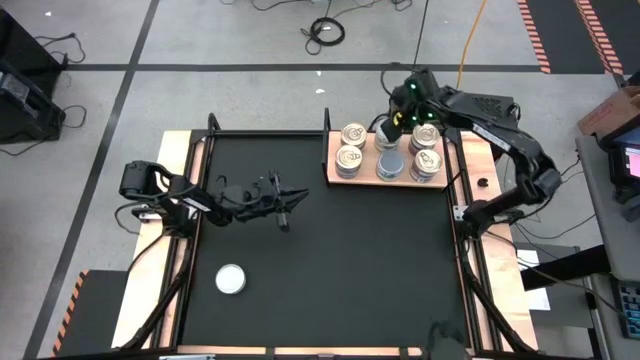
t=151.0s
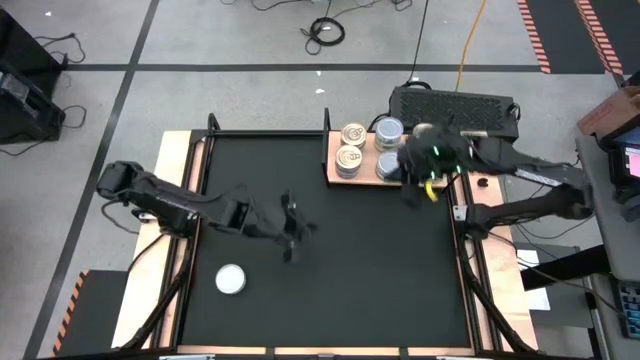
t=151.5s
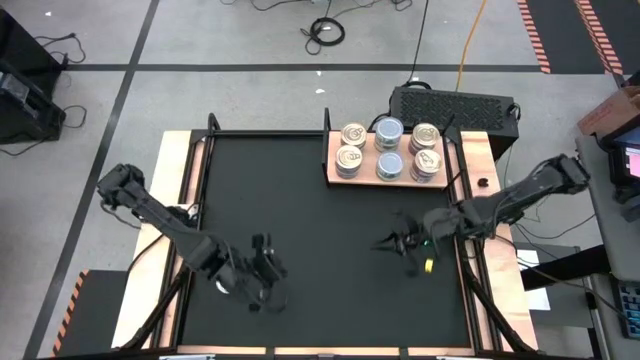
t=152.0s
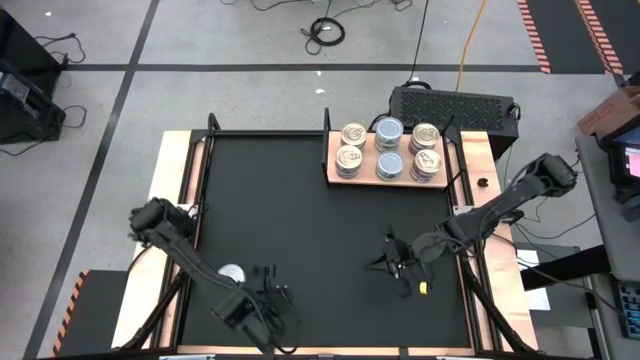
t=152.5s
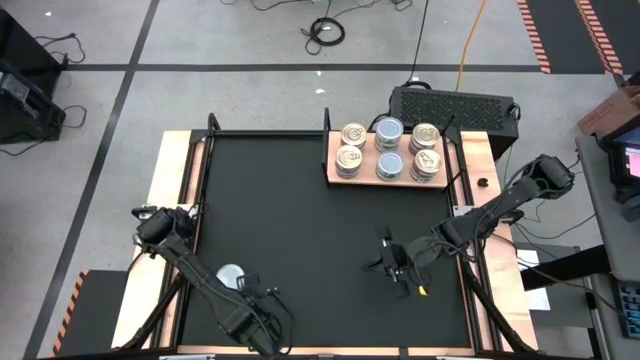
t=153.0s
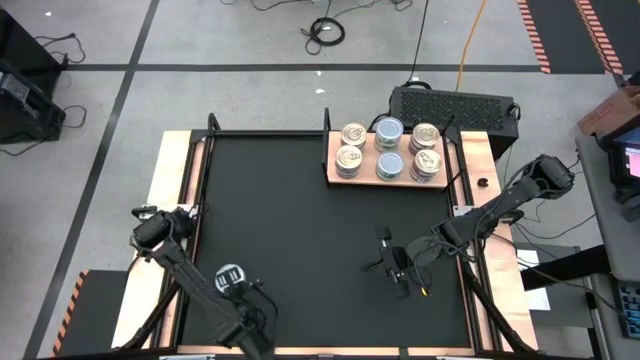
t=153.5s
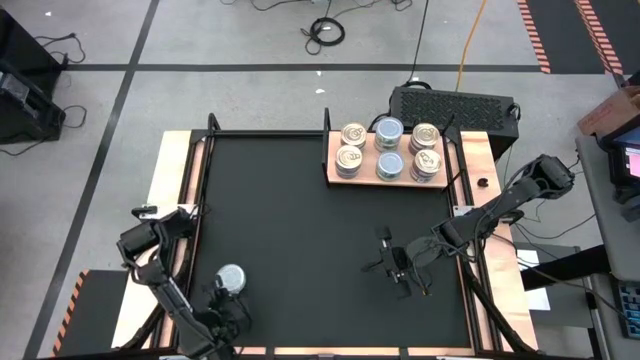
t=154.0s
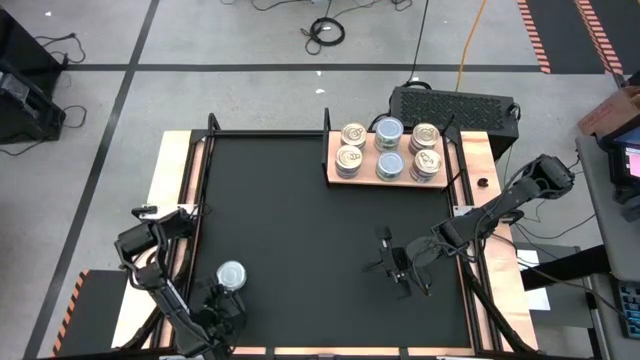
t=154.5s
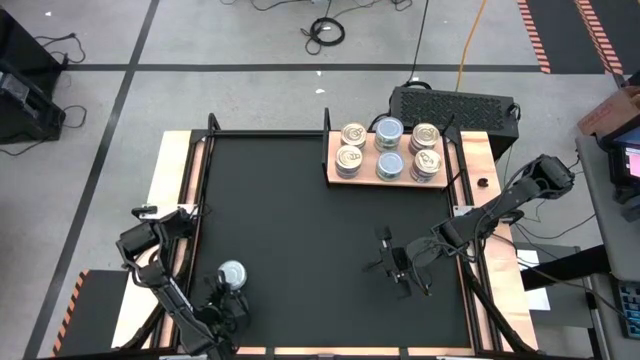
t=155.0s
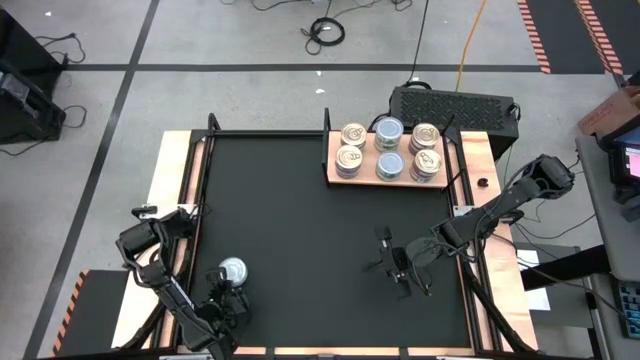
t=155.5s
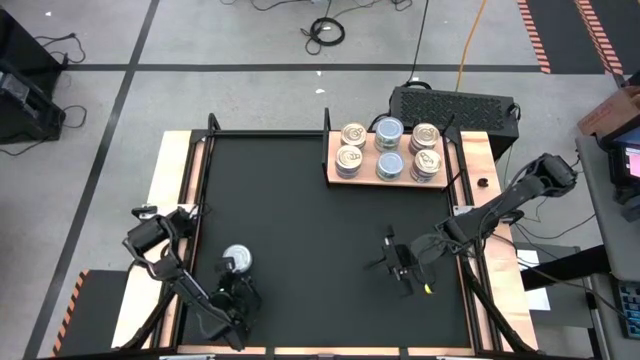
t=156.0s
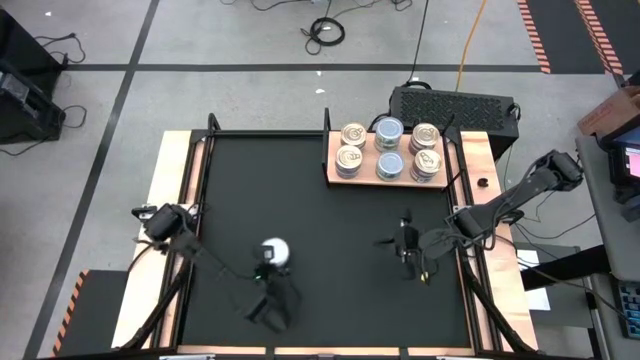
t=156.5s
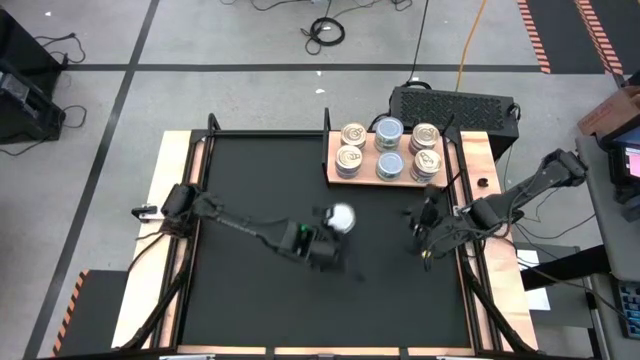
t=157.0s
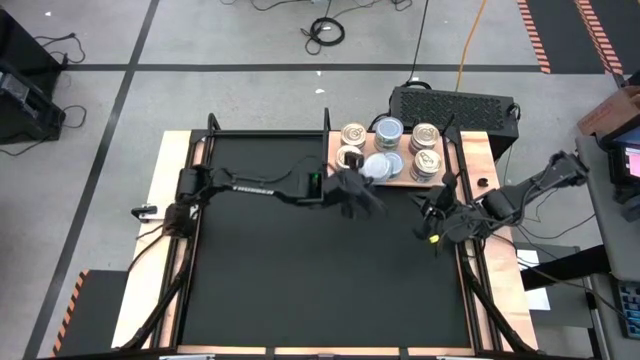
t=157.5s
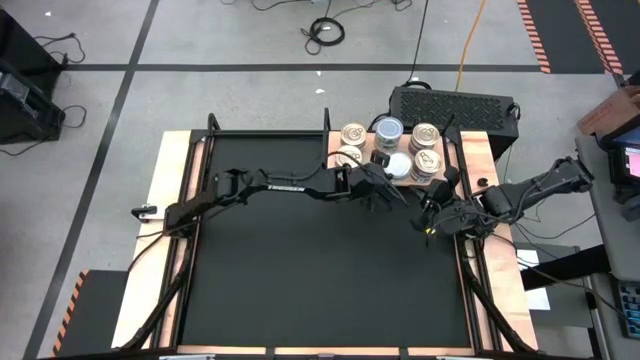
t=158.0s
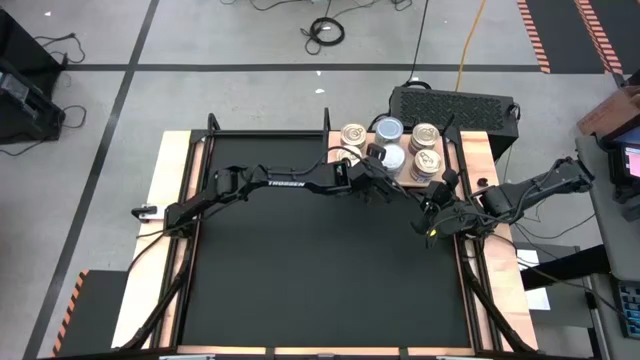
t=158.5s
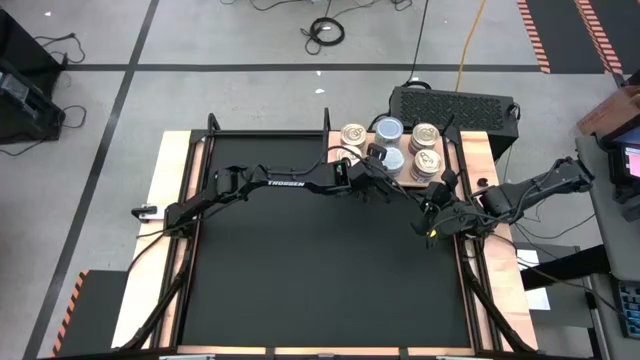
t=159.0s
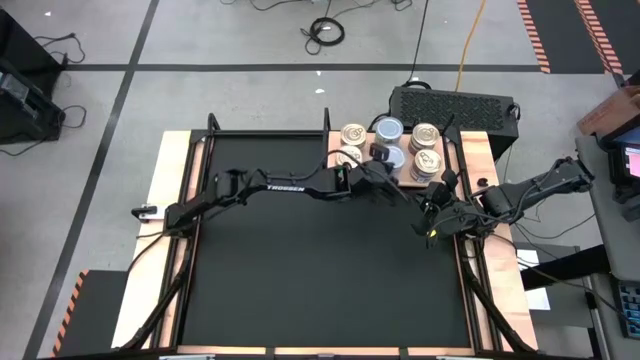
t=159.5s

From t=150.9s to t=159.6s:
Task: Stack canned seafood by type on shelf
Stack the green tuna can on top of the bottom green tuna cans on the shelf

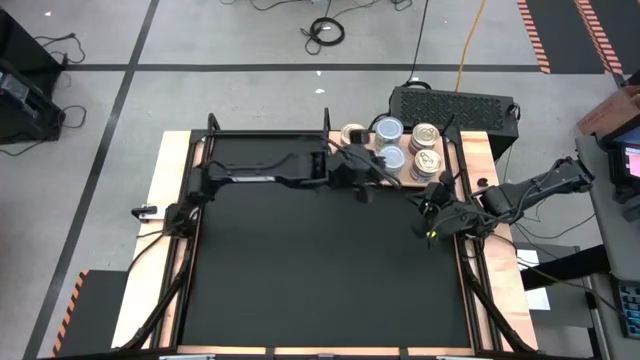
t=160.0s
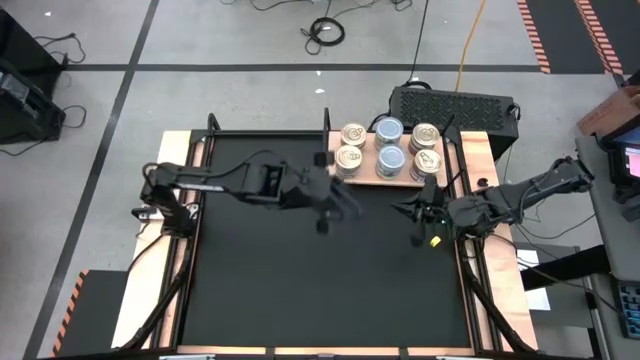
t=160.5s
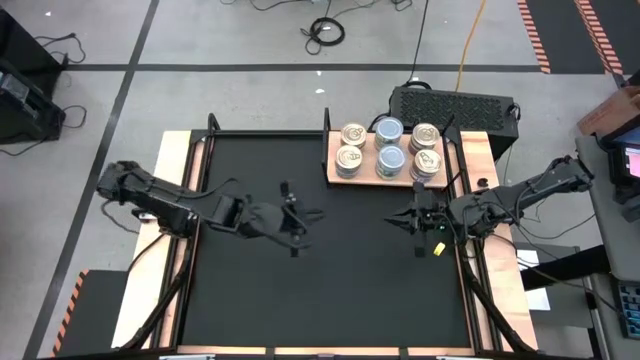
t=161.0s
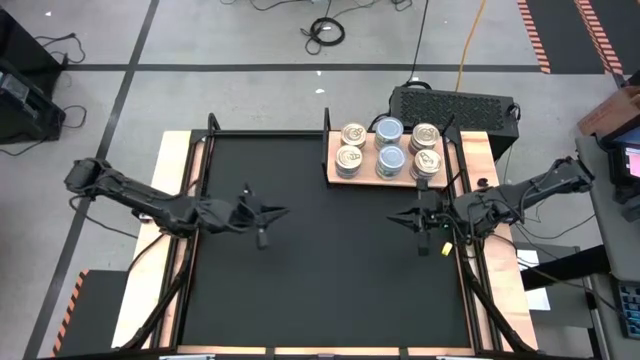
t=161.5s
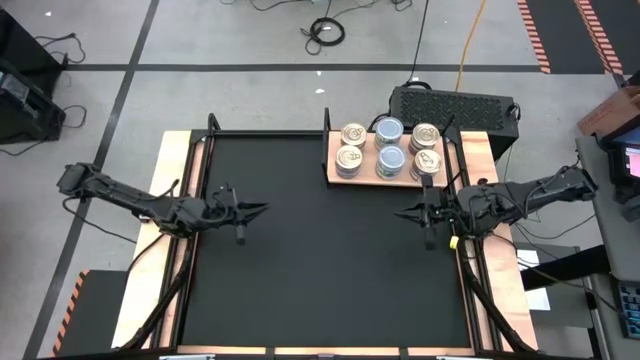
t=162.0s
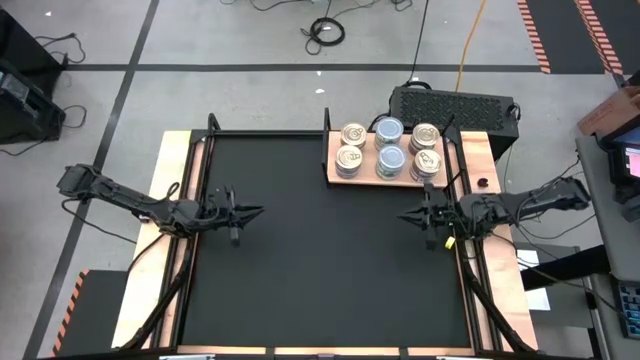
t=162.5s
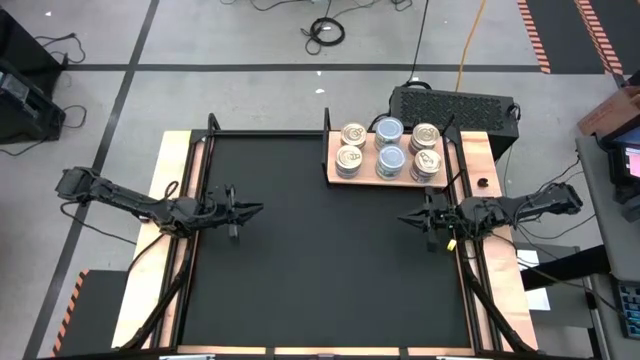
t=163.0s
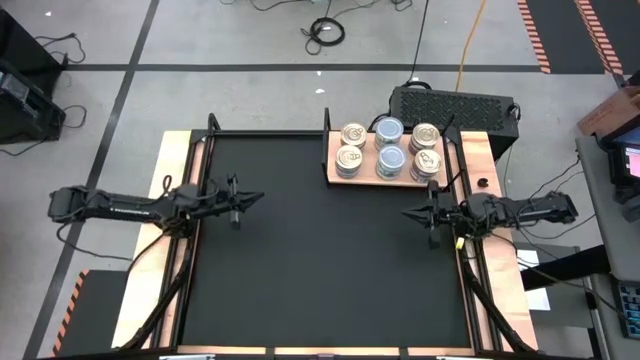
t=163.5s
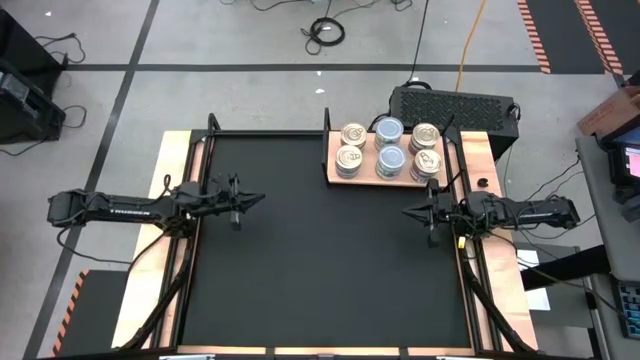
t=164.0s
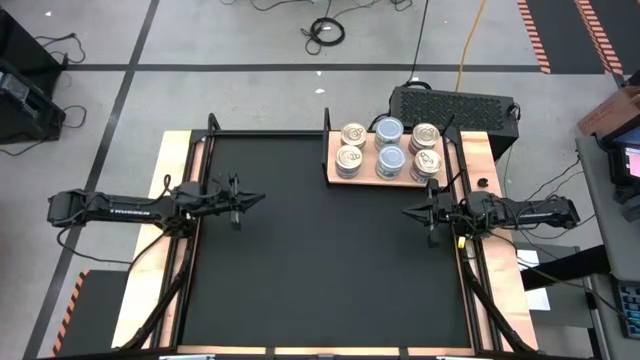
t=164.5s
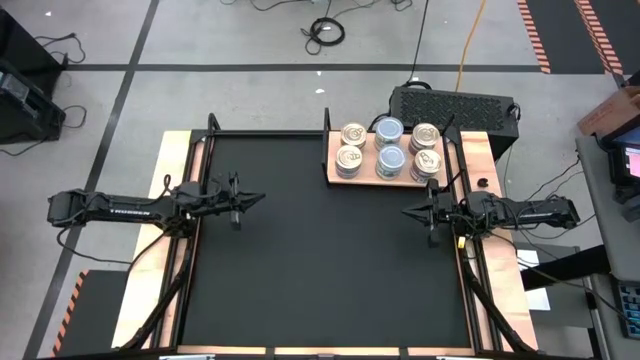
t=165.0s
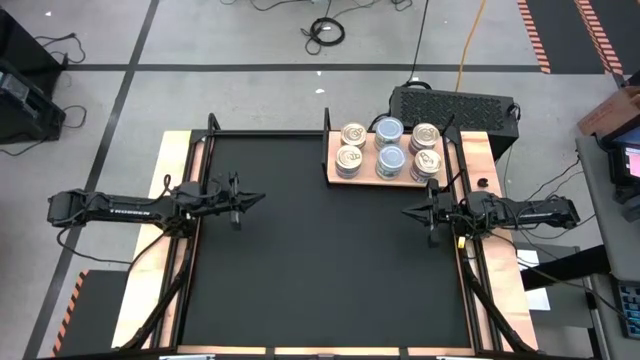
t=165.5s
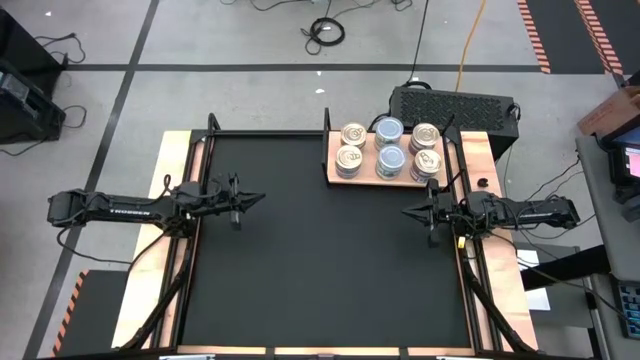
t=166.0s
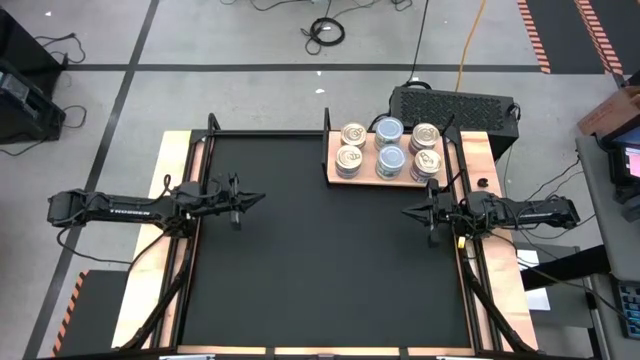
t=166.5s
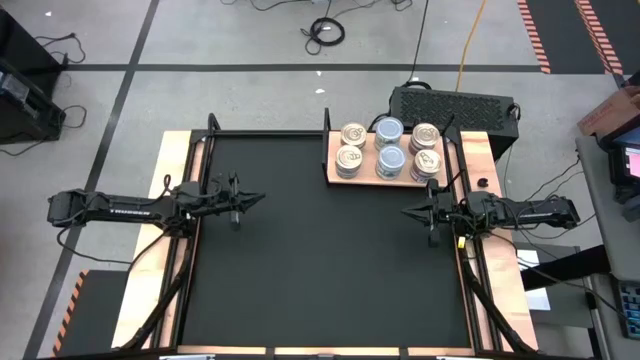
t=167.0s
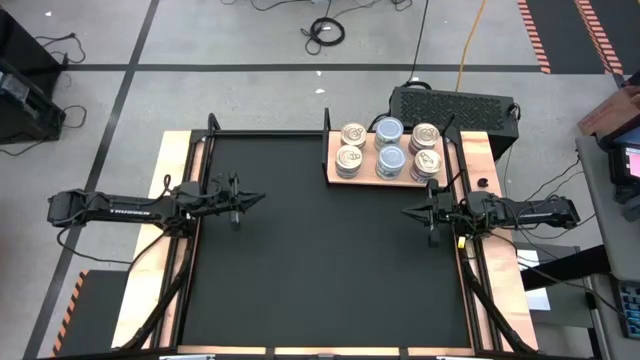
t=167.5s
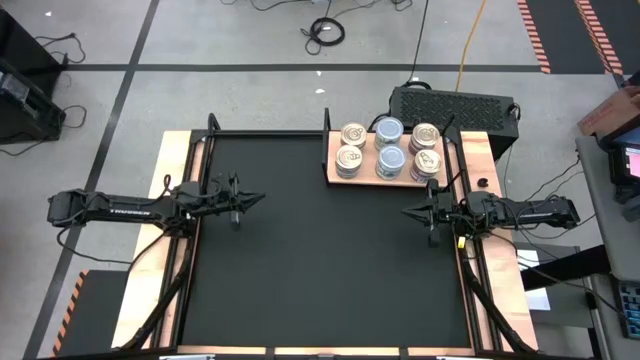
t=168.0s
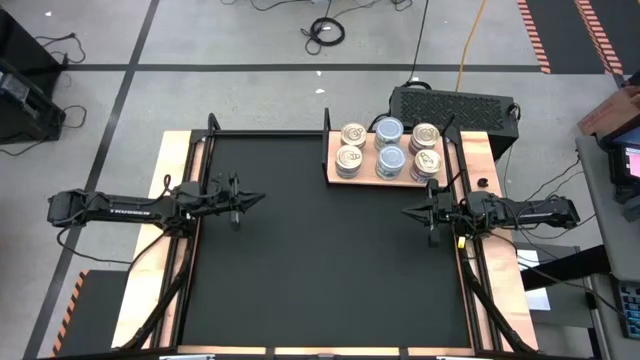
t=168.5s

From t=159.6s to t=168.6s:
Return to Home Position

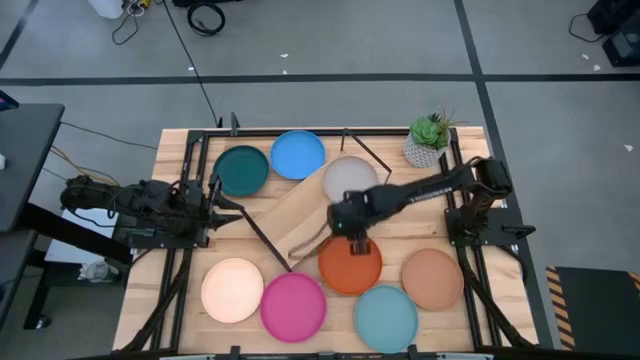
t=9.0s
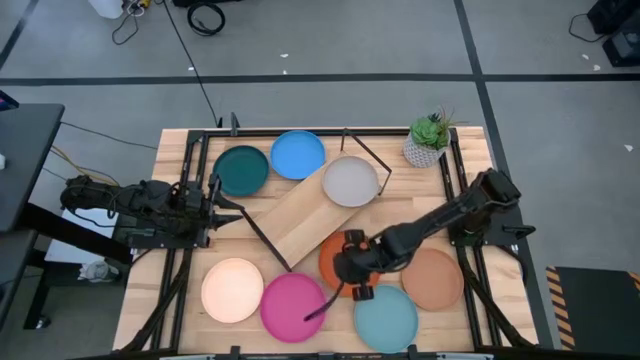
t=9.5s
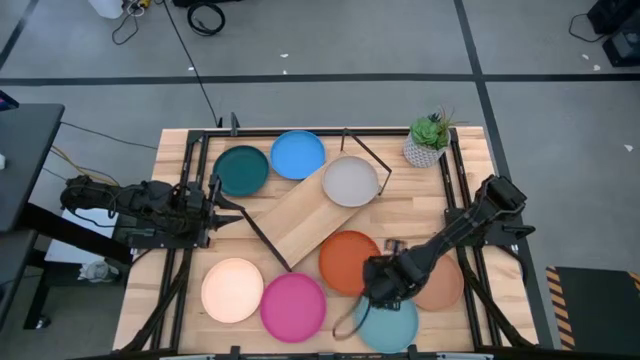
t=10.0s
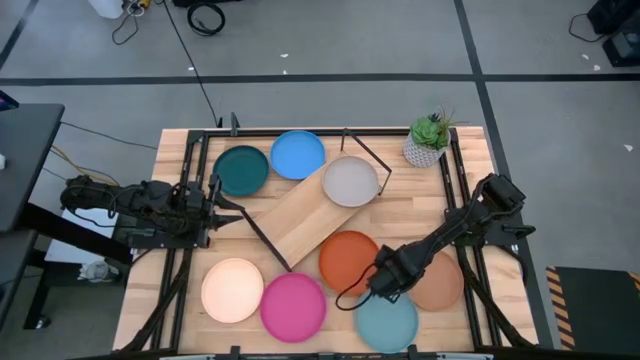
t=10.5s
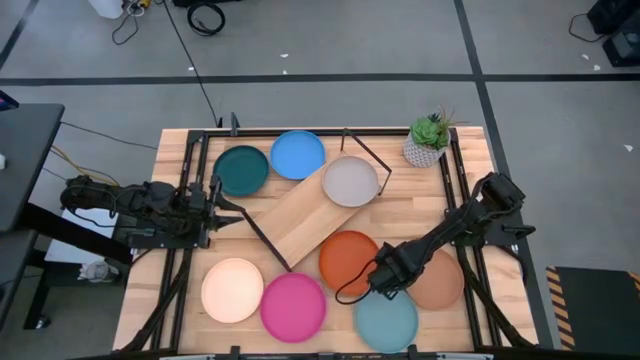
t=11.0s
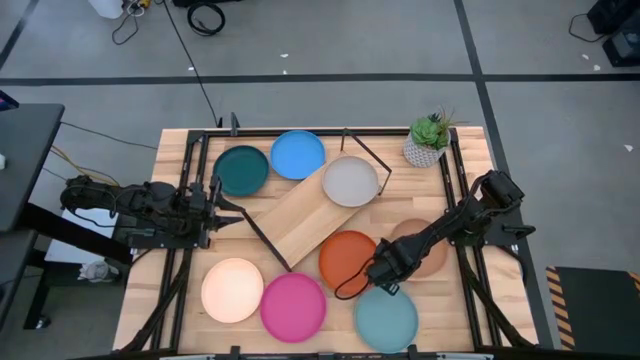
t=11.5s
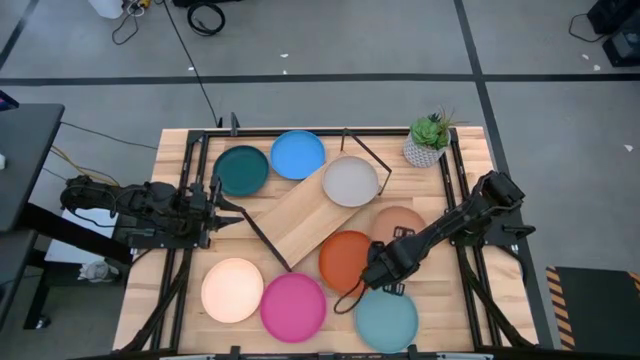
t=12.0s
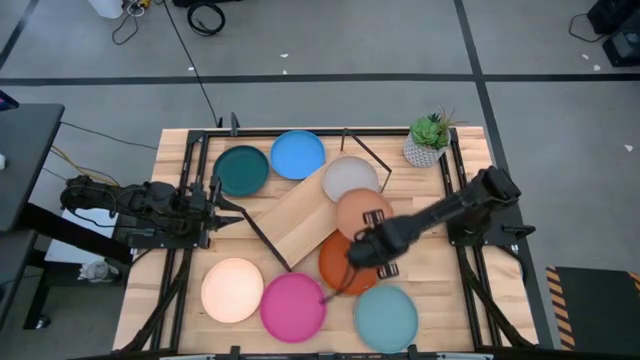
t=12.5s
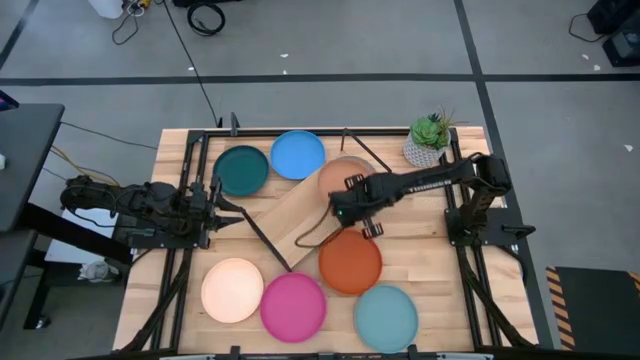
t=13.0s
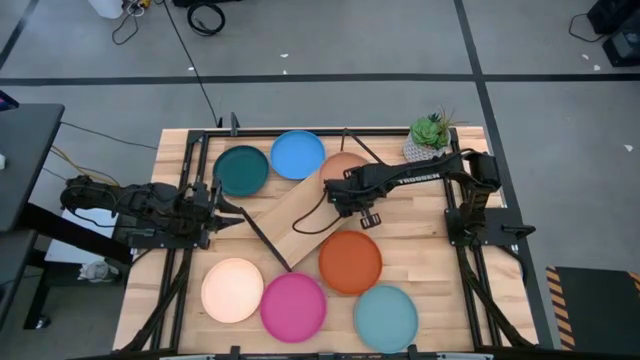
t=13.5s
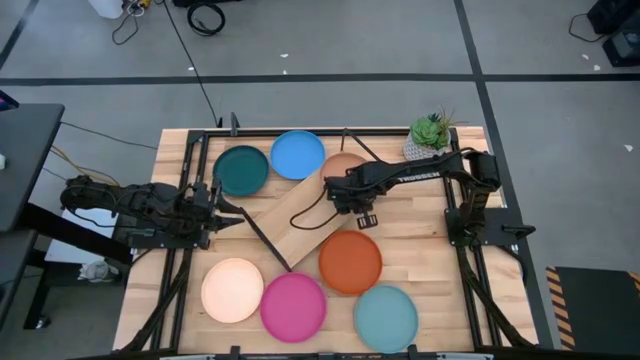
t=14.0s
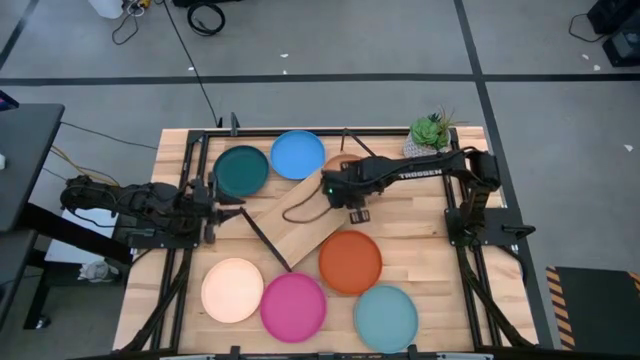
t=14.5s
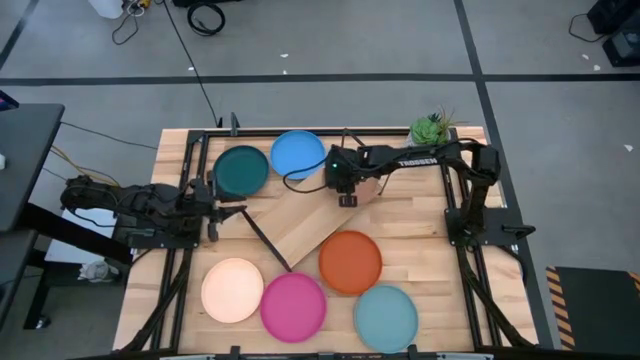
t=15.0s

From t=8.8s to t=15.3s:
Task: Place and stack plates onto a shelf
Stack the brown plate on top of the gray plate on the shelf
